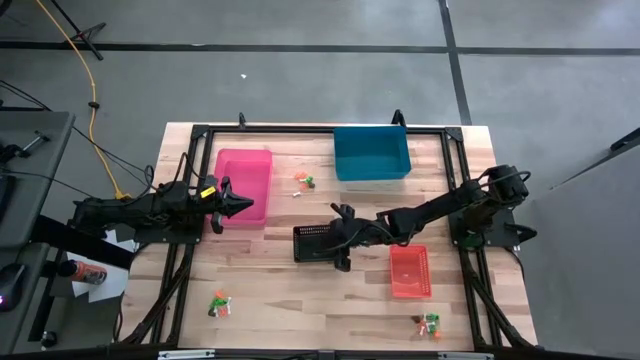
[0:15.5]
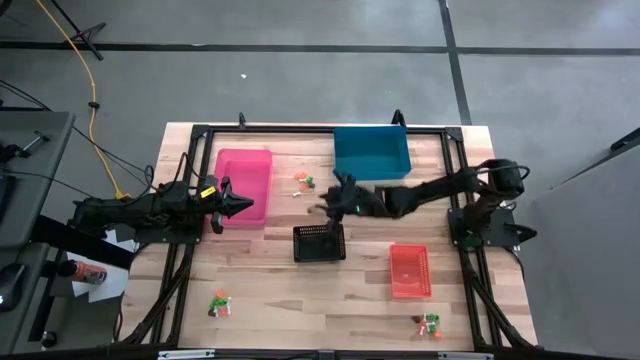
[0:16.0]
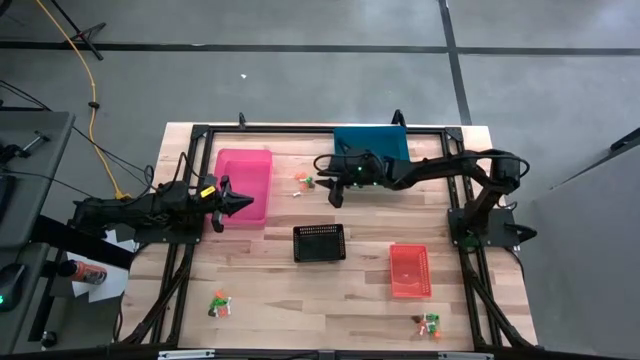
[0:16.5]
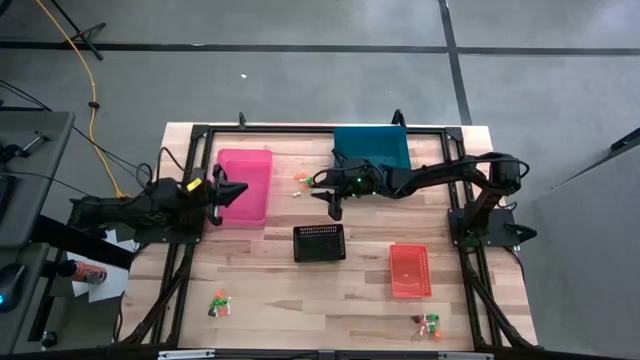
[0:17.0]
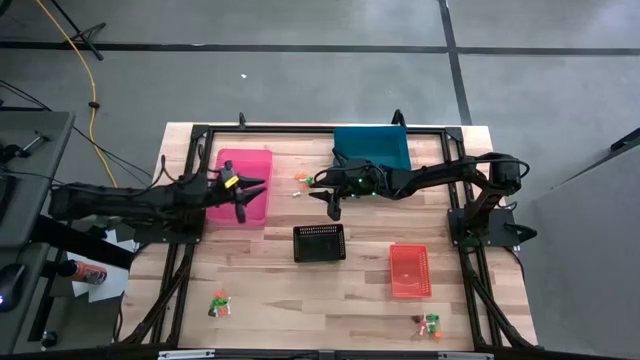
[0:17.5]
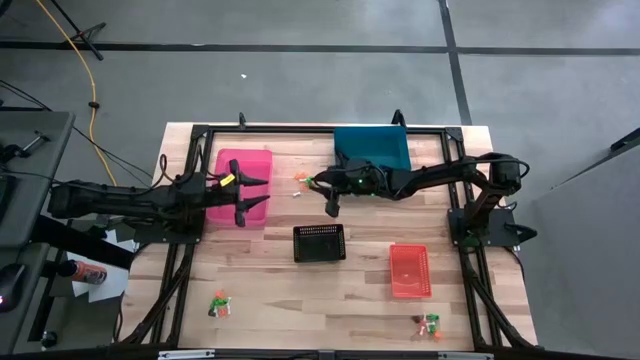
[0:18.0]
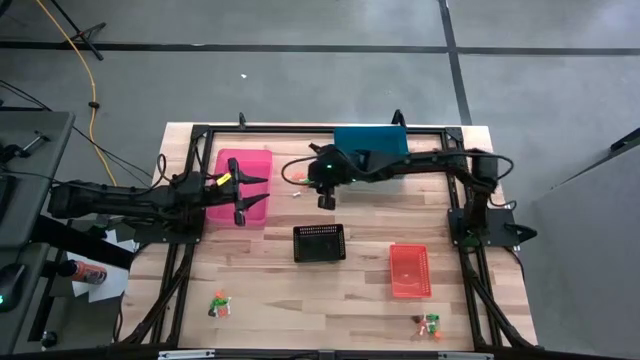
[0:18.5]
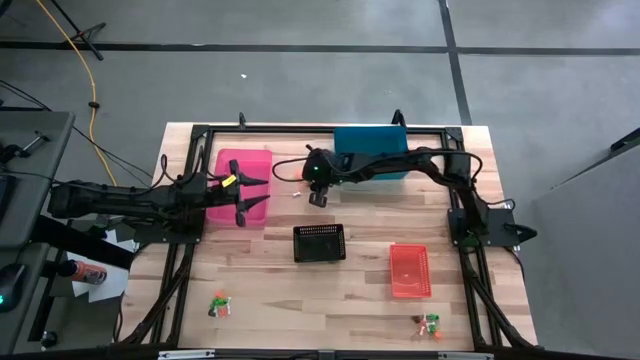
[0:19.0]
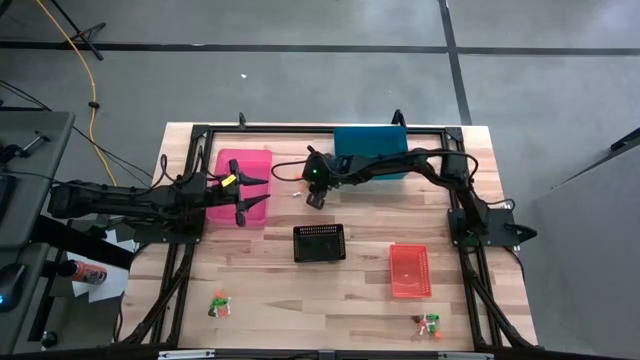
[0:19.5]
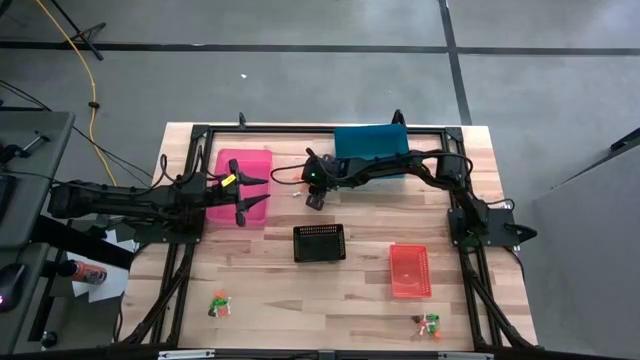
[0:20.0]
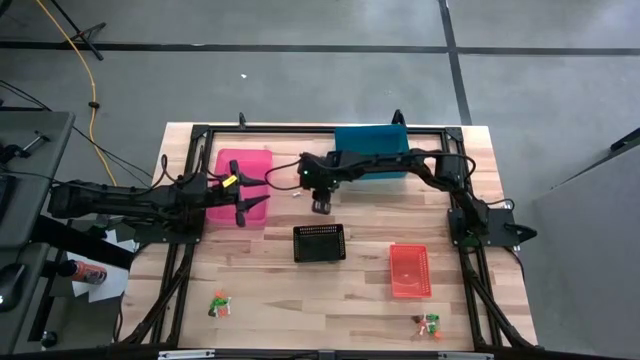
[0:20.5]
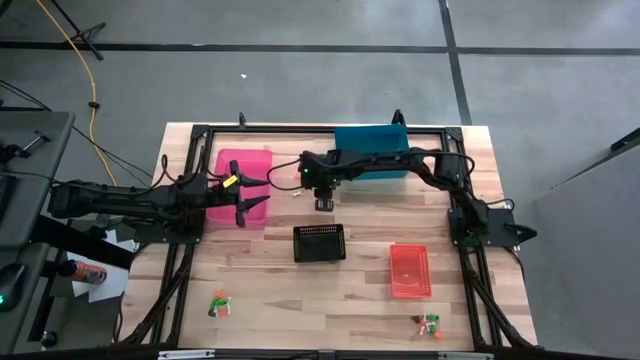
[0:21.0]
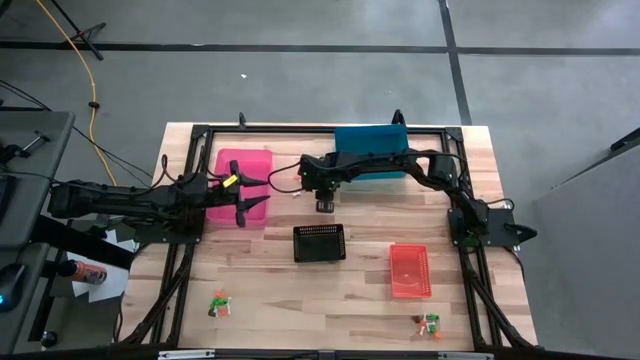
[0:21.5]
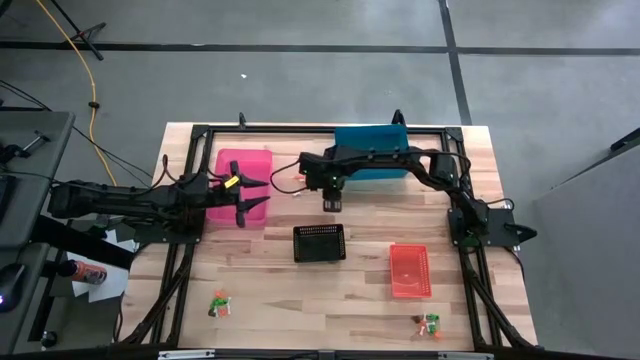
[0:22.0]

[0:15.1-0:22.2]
Task: Sort Halloween decoration
Put the black skull toy into the black bin

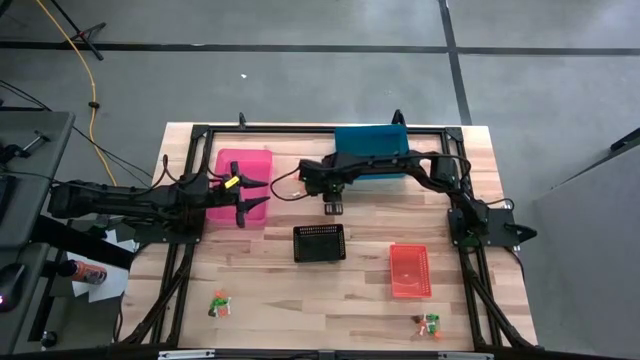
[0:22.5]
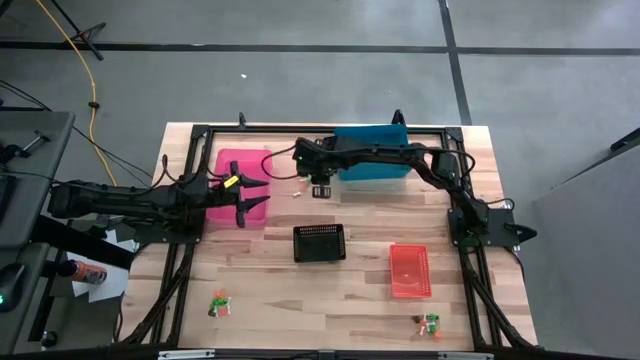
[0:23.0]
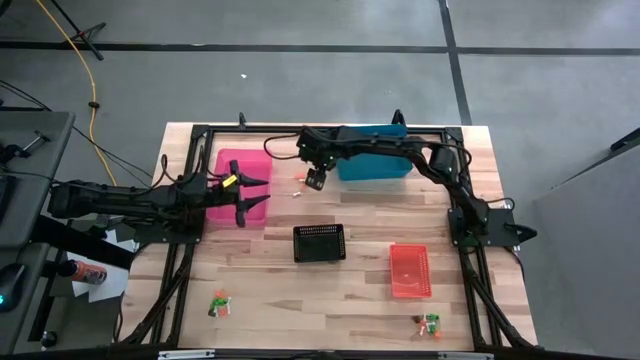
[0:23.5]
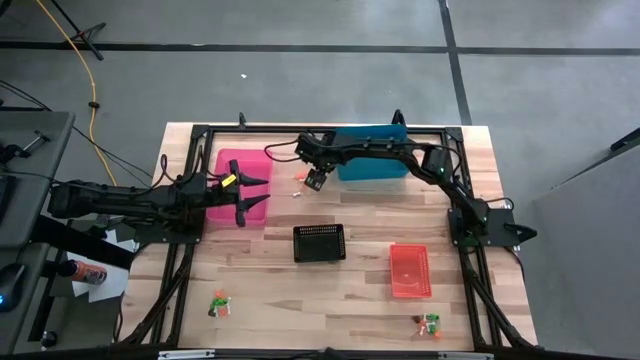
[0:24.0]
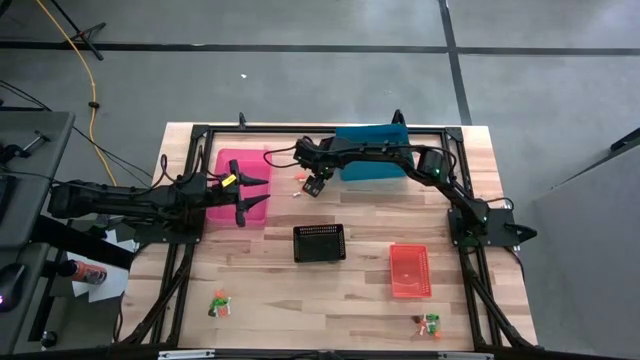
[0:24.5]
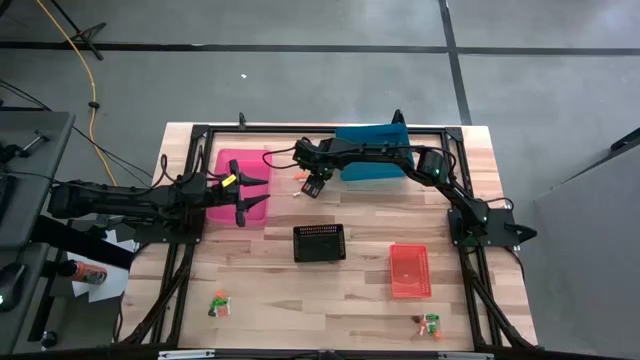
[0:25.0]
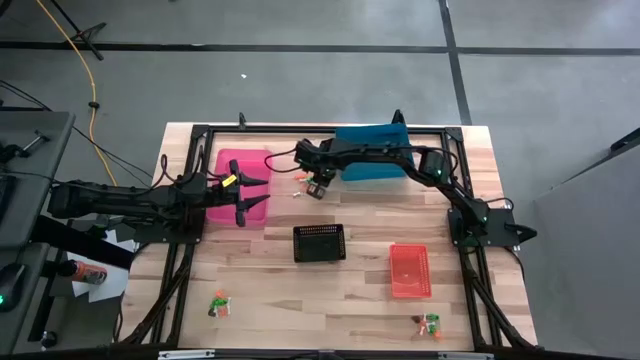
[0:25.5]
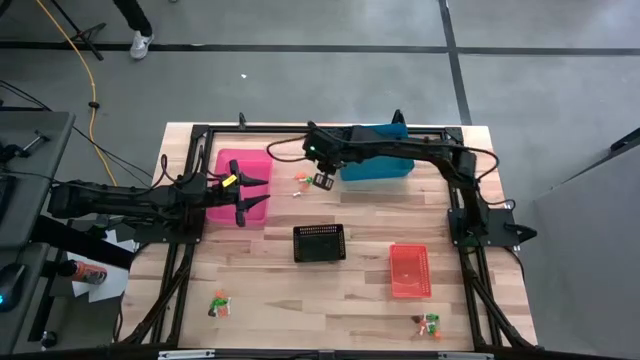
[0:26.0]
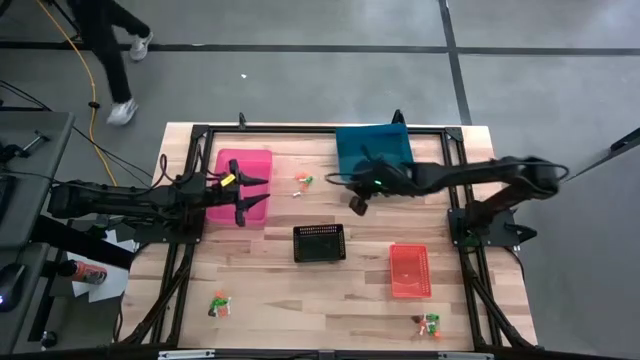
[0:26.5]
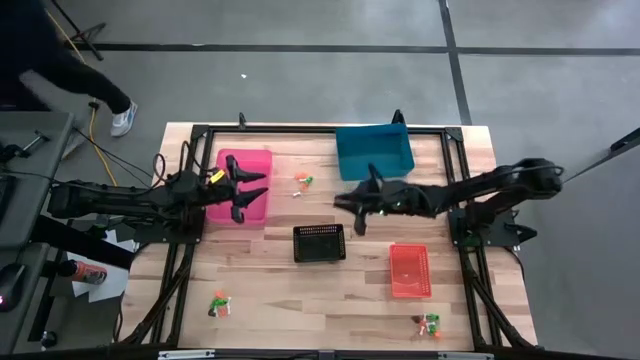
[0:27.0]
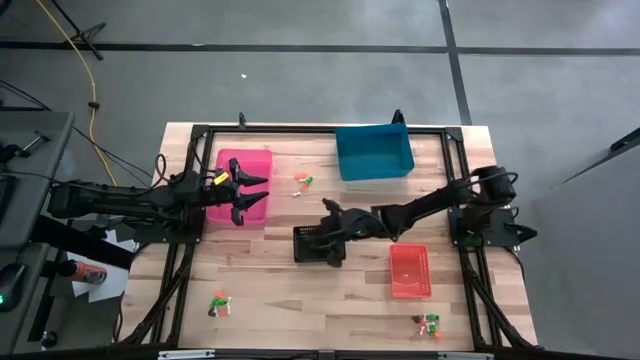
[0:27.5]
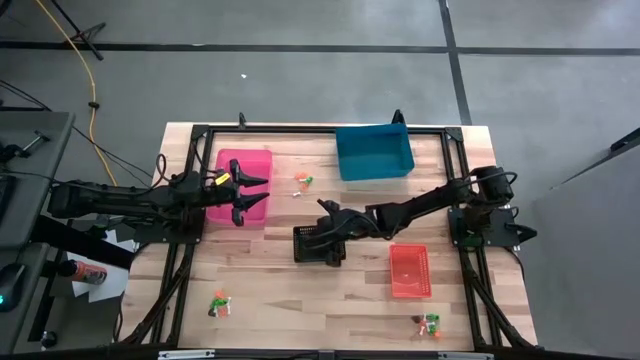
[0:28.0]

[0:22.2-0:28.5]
Put the black skull toy into the black bin

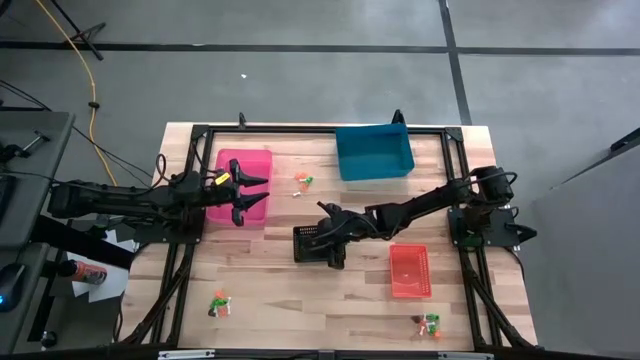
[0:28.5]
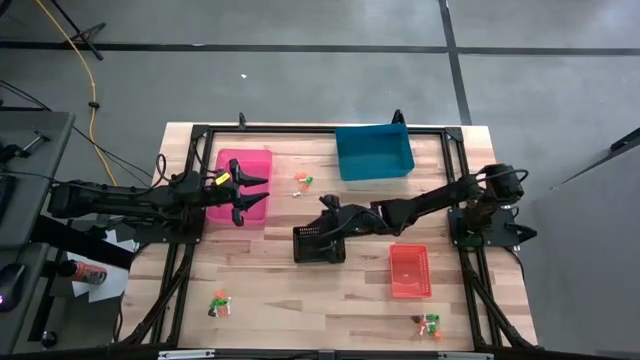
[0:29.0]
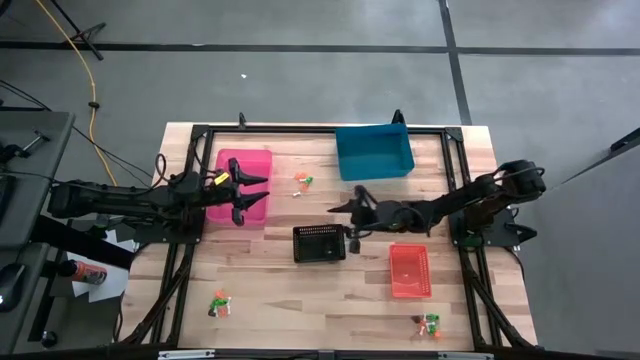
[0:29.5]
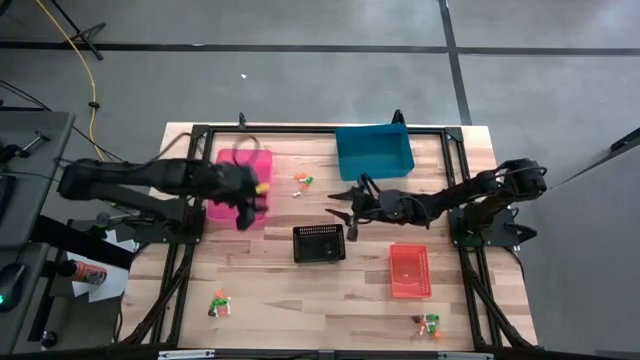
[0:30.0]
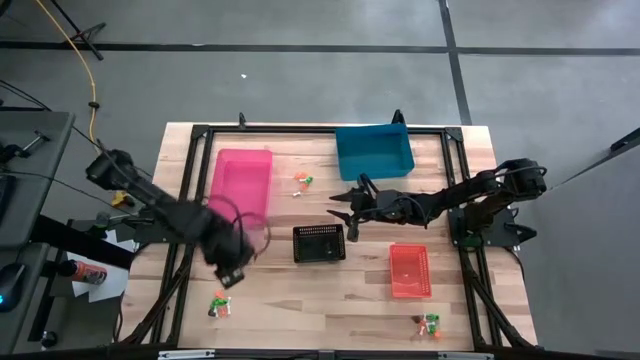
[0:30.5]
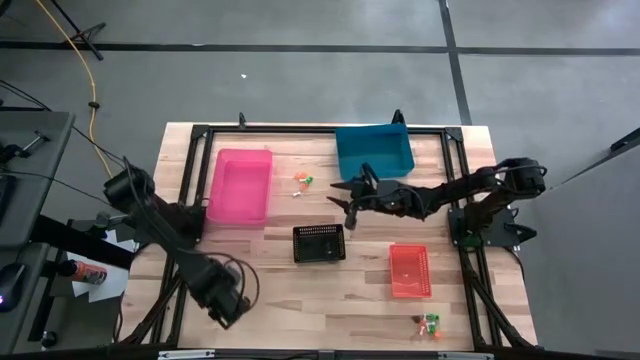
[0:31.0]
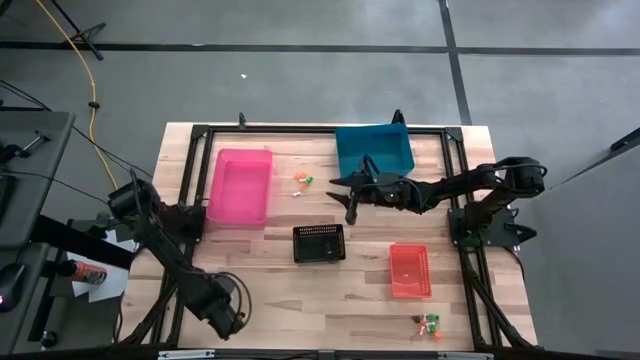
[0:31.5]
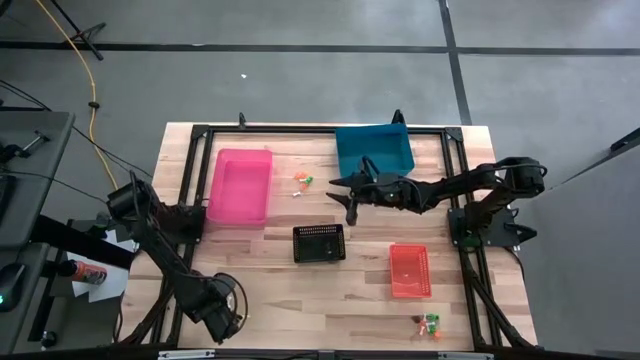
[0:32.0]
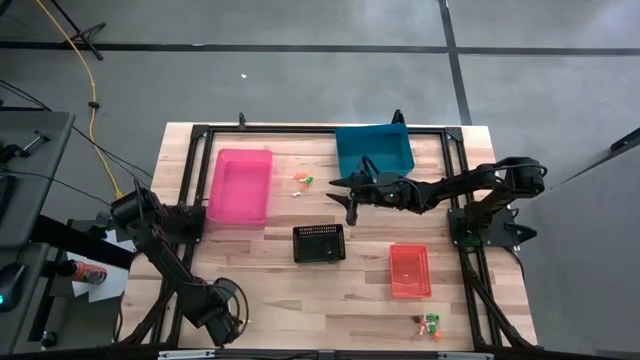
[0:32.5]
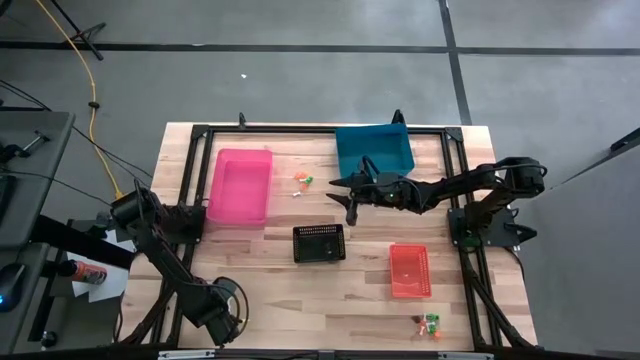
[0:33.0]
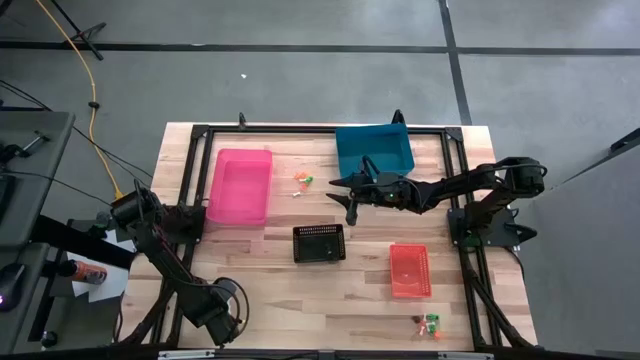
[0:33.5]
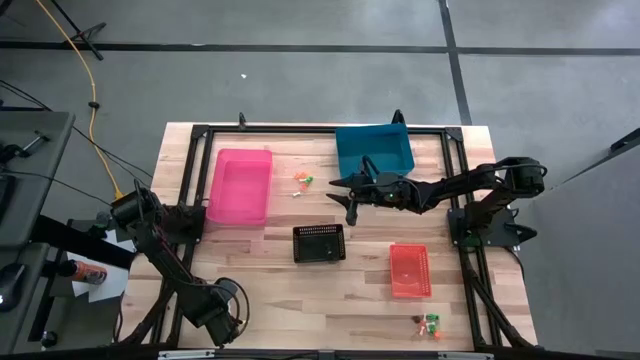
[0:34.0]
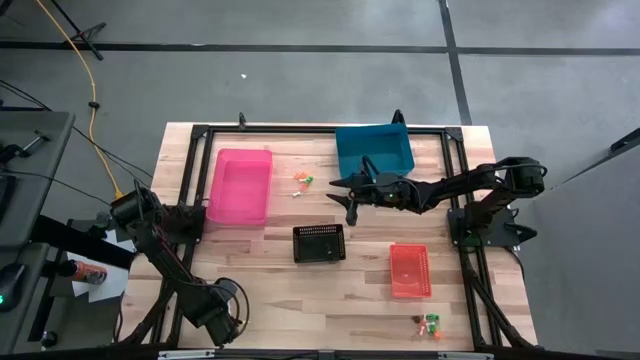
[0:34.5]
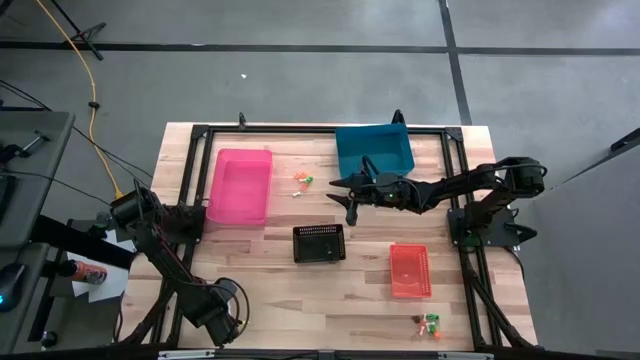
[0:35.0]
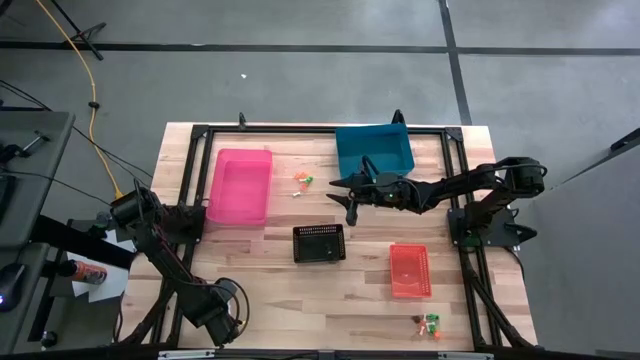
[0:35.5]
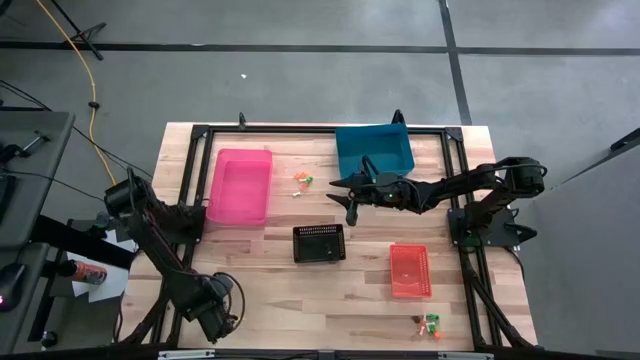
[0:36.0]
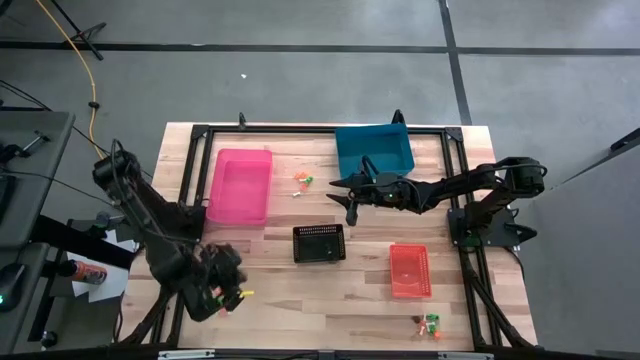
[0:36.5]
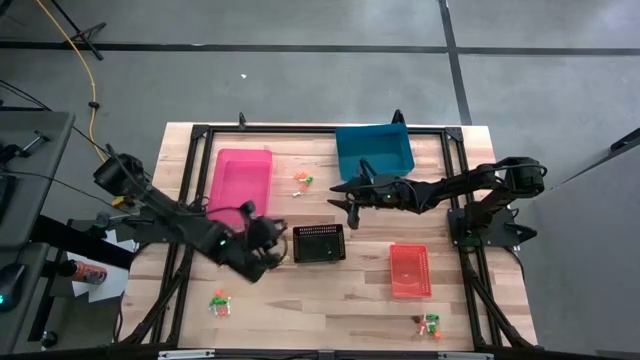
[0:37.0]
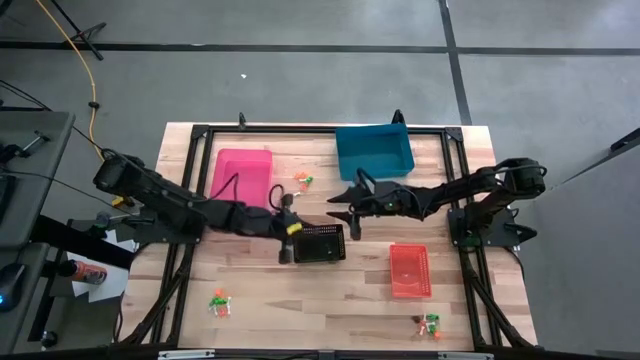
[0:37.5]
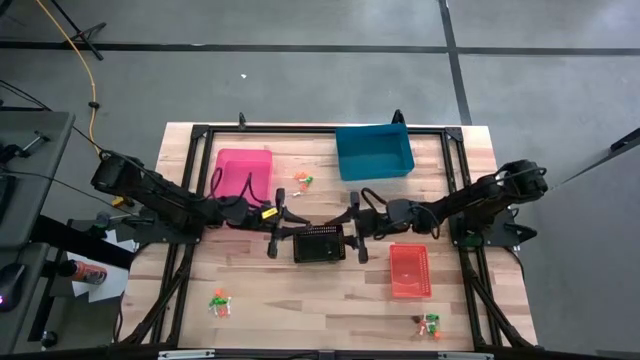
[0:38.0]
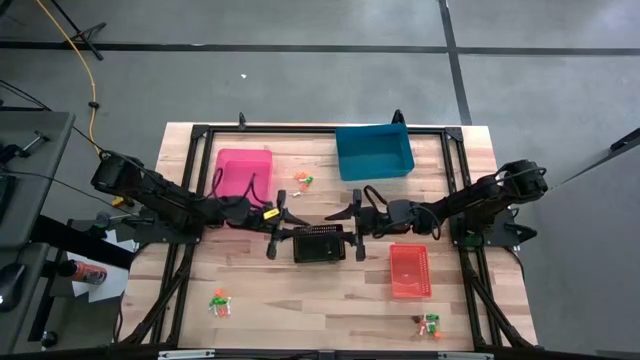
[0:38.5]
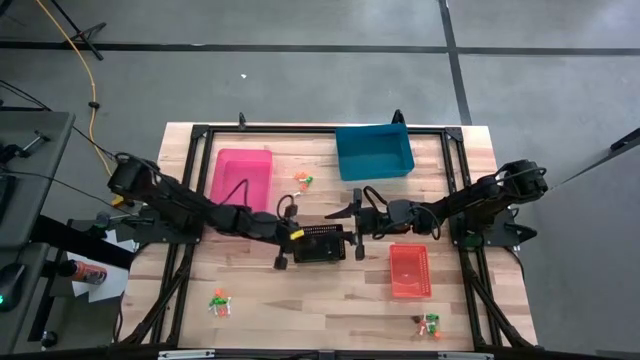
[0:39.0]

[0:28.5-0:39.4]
Put the black skull toy into the black bin
